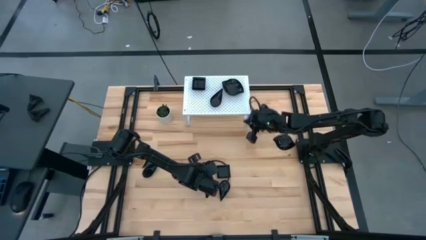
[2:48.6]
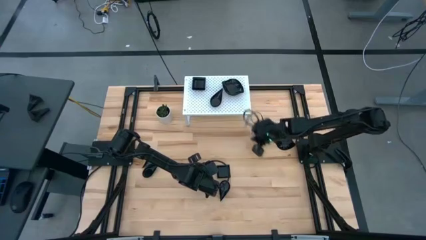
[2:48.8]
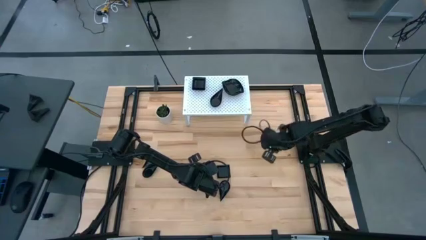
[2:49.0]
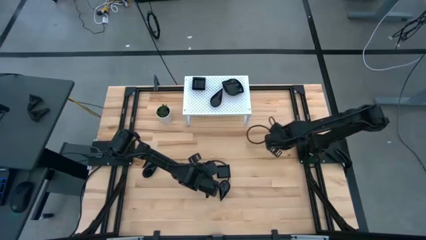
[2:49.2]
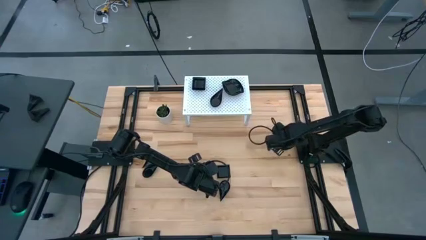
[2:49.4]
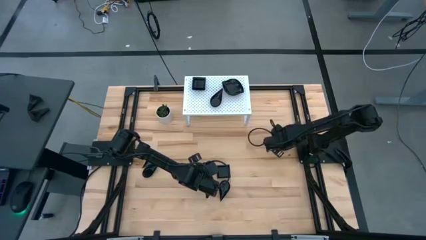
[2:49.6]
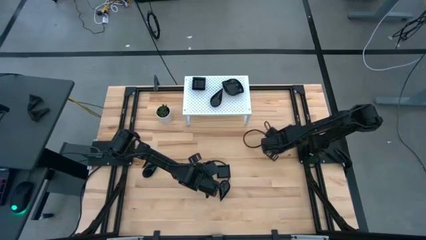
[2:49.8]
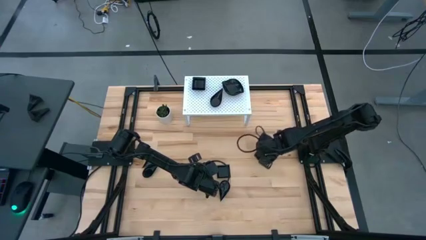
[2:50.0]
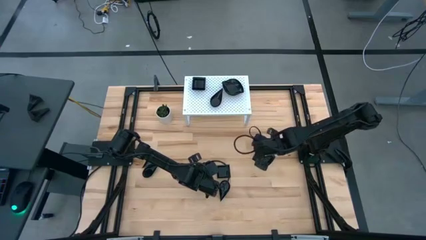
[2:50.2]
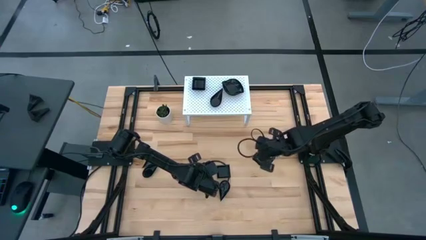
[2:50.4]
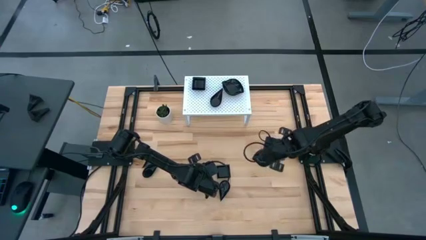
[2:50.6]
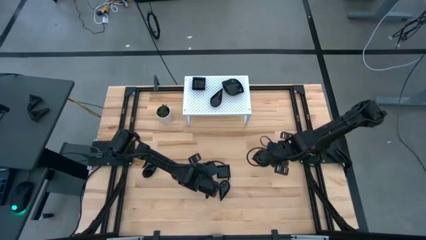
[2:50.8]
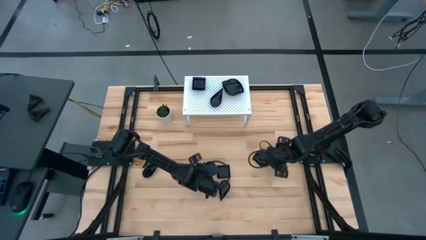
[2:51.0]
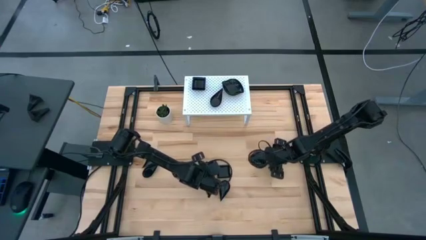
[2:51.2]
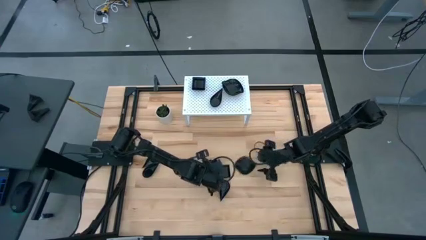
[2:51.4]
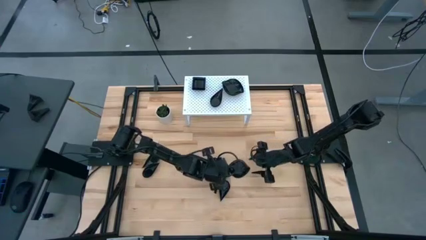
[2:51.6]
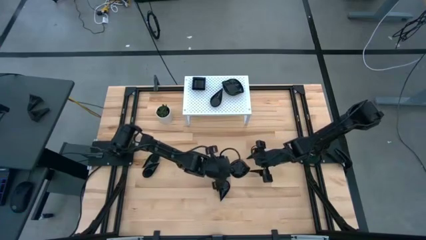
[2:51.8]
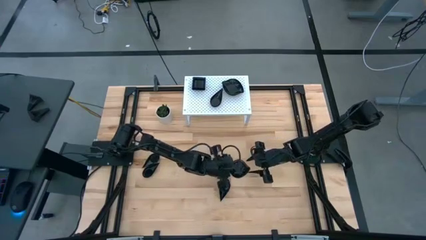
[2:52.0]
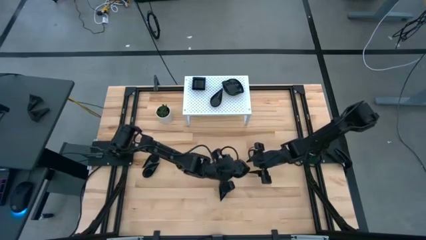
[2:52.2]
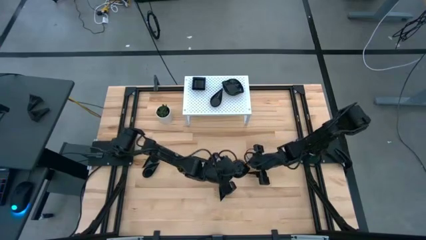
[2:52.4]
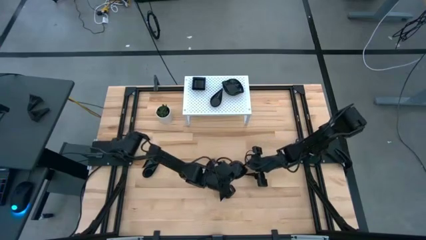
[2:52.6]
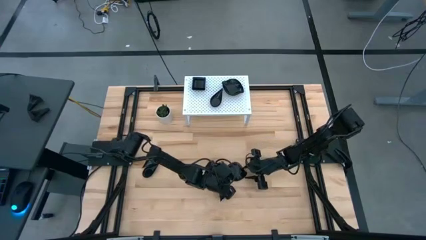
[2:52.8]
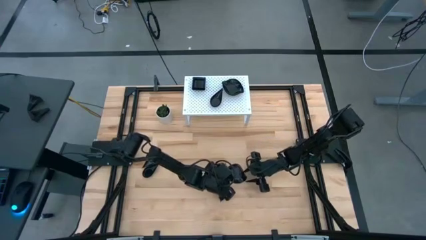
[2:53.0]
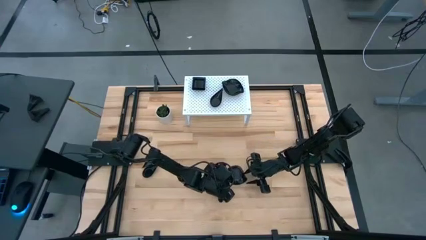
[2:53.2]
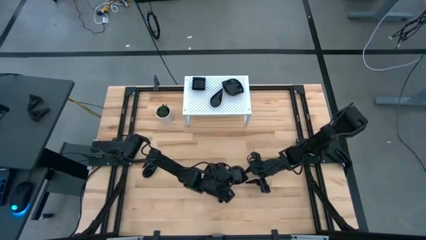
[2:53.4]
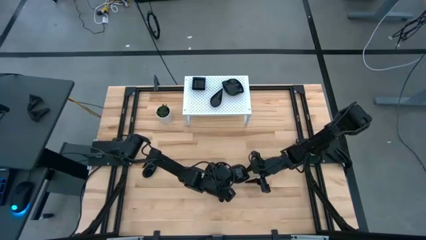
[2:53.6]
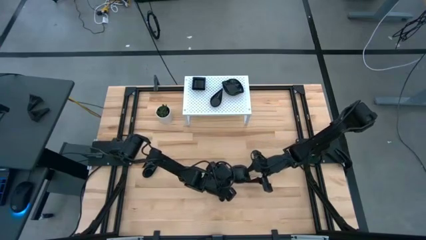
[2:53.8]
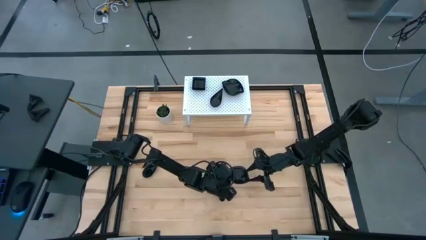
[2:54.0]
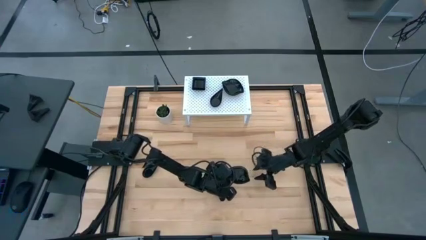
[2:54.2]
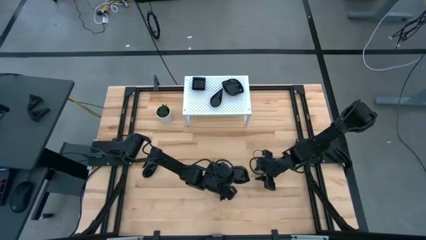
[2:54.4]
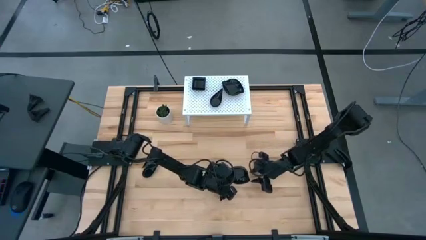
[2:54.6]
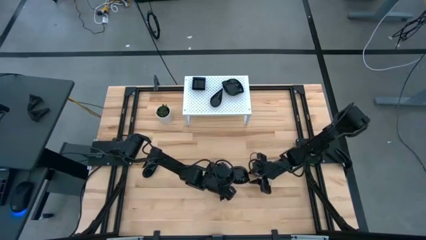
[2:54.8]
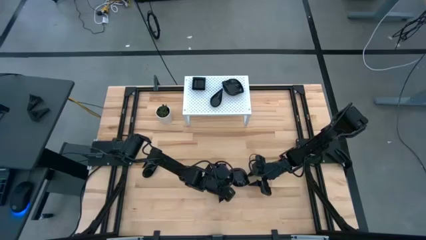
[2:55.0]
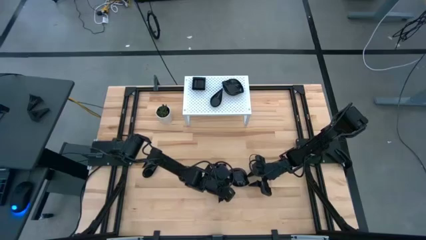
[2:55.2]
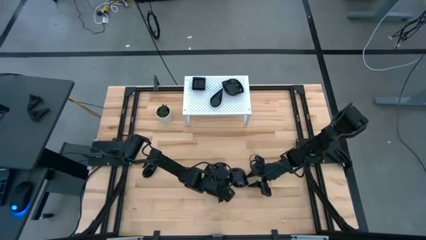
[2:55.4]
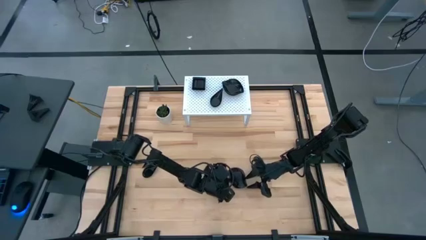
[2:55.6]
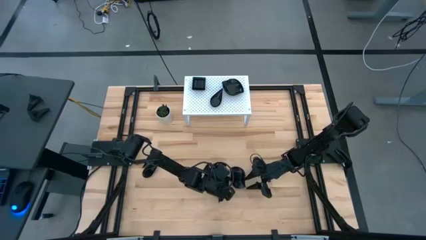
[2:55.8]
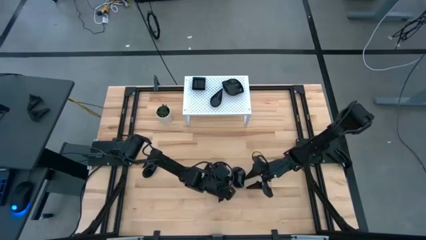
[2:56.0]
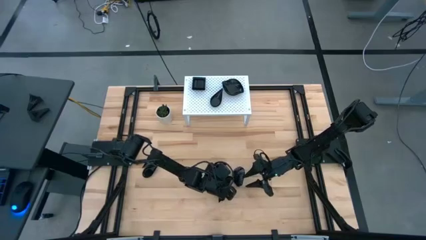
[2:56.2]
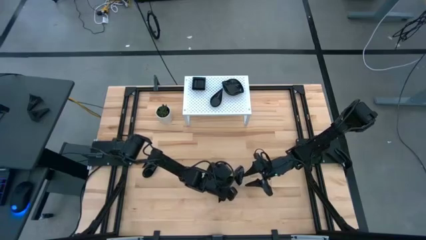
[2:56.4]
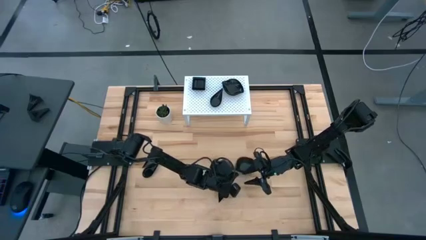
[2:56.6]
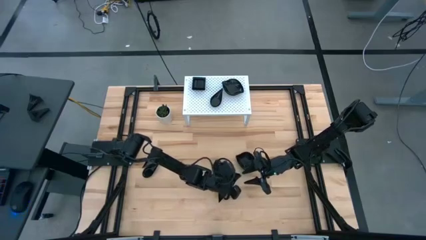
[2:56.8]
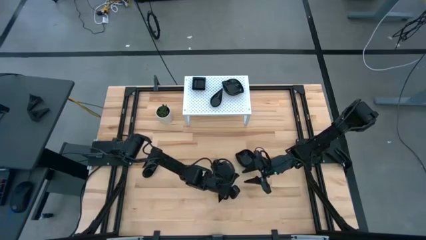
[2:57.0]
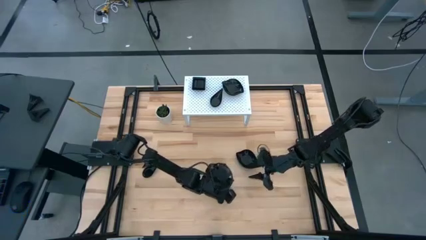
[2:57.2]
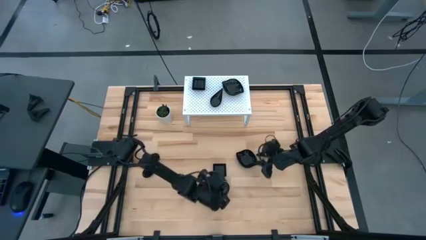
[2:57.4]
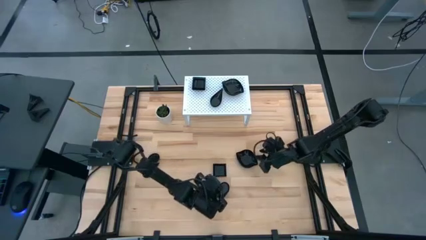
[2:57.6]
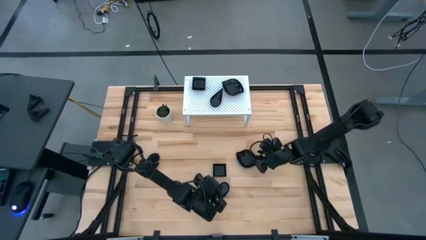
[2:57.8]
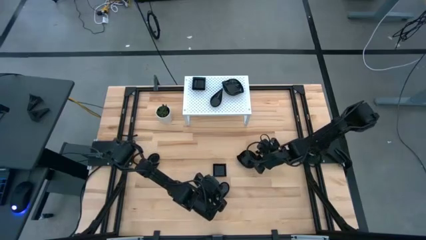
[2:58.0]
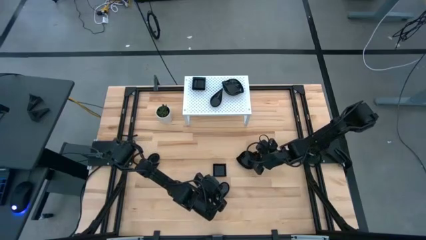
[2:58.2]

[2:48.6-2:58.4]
Task: Pick & Place Mini shaped plates
Stack the black plate on top of the black plate on the shelf

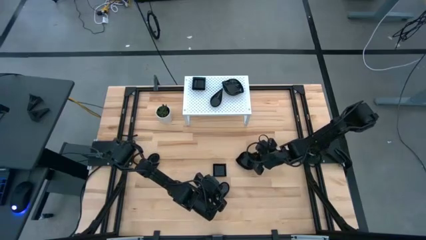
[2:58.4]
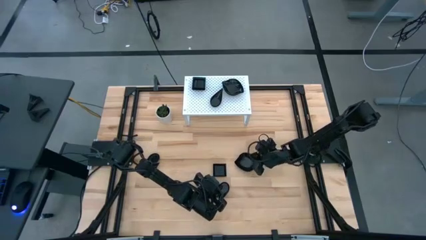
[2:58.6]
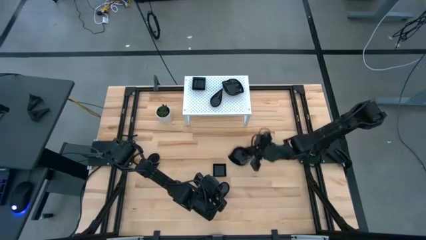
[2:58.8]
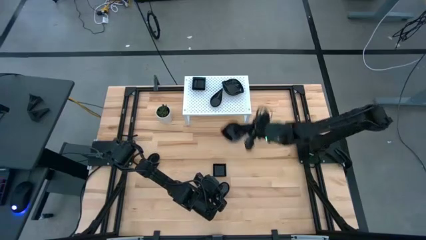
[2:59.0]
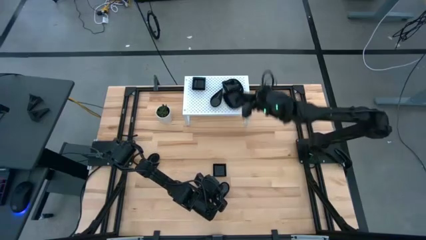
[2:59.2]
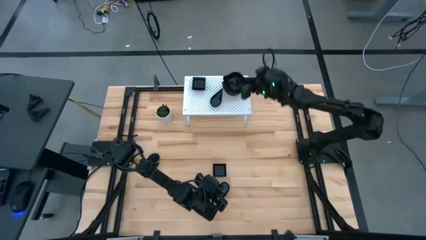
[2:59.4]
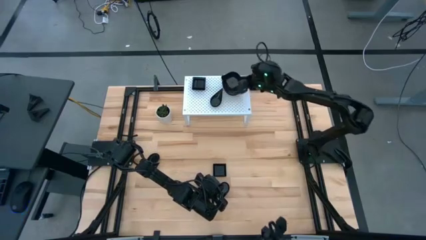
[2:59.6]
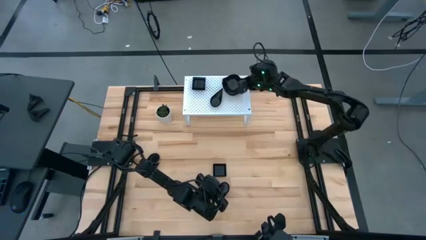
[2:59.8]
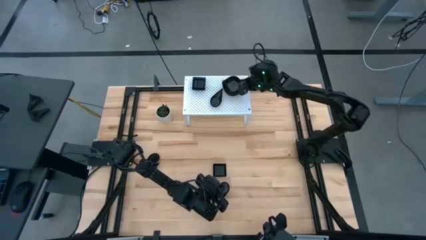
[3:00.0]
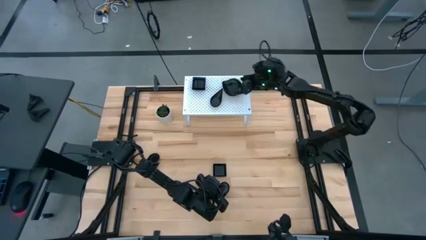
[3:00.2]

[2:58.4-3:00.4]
Stack the black plate on top of the black plate on the shelf

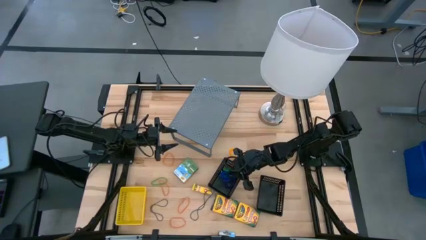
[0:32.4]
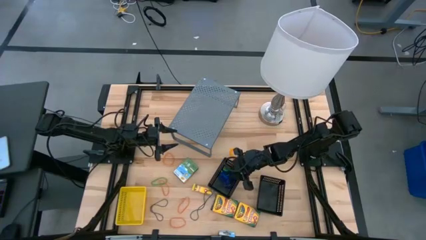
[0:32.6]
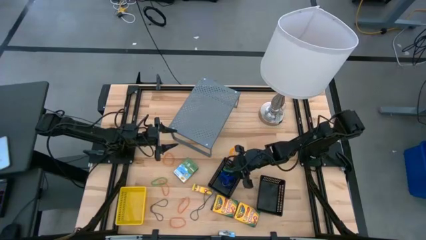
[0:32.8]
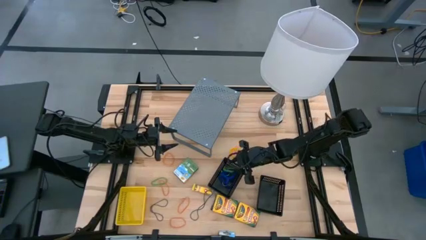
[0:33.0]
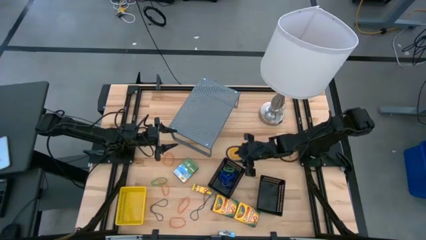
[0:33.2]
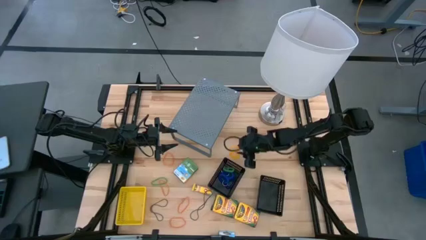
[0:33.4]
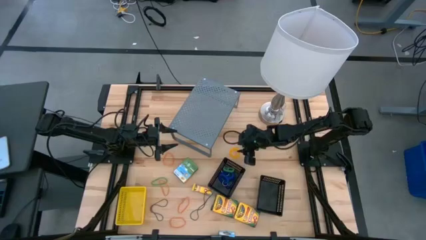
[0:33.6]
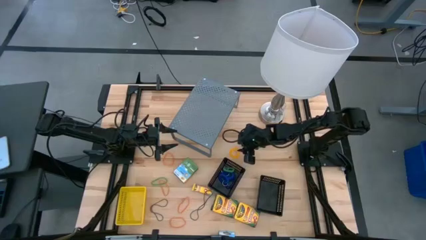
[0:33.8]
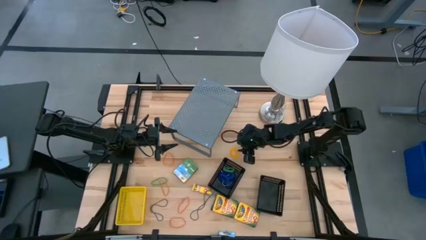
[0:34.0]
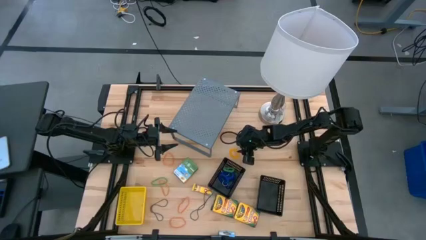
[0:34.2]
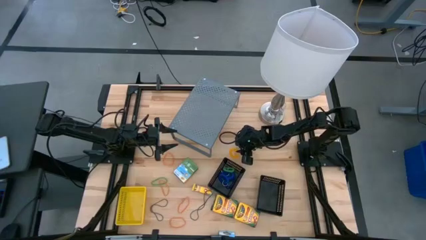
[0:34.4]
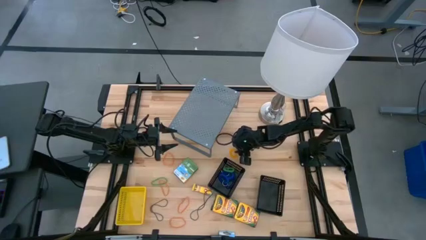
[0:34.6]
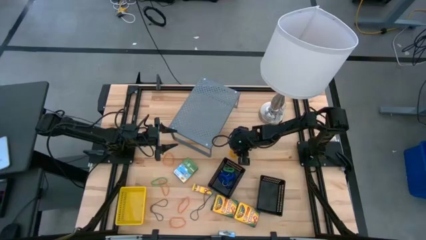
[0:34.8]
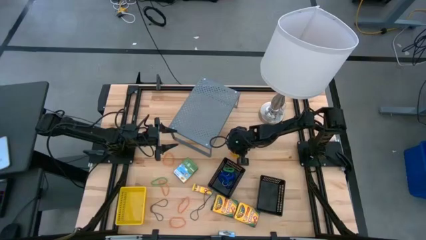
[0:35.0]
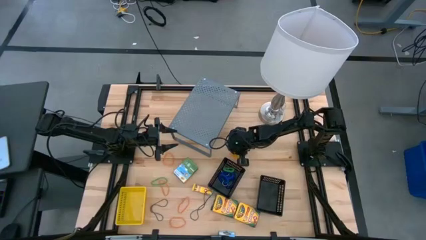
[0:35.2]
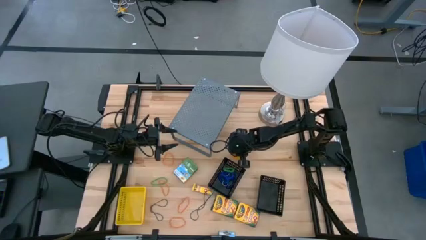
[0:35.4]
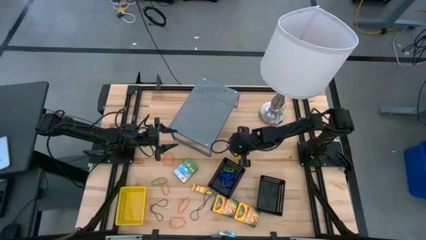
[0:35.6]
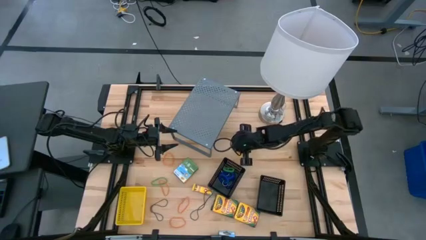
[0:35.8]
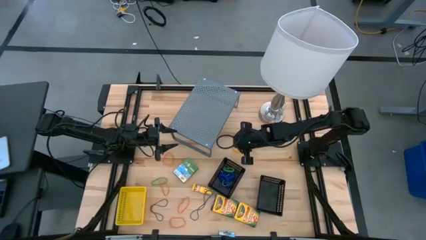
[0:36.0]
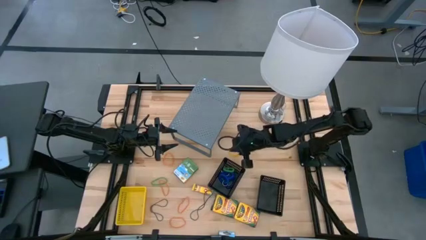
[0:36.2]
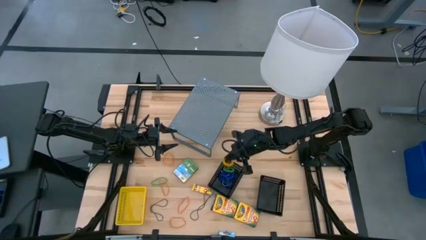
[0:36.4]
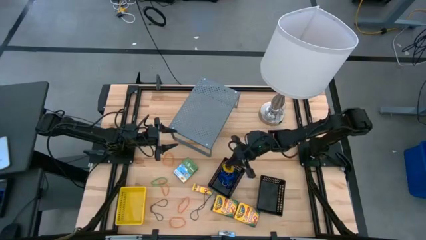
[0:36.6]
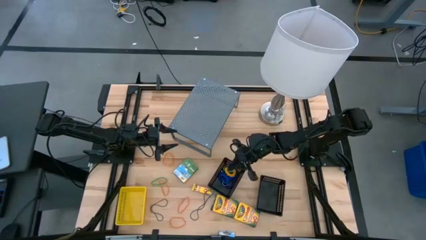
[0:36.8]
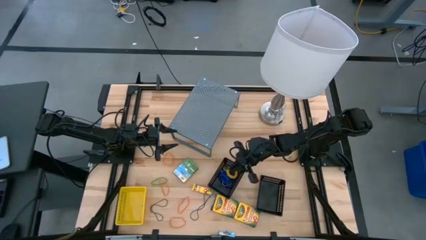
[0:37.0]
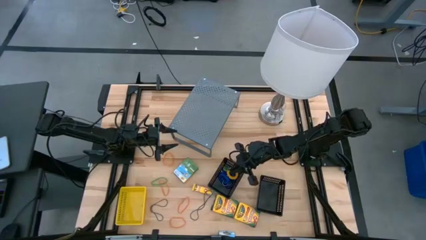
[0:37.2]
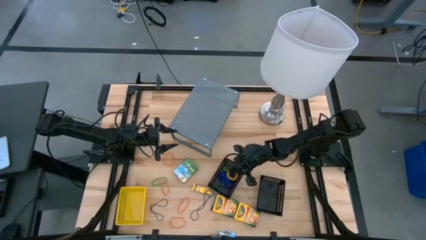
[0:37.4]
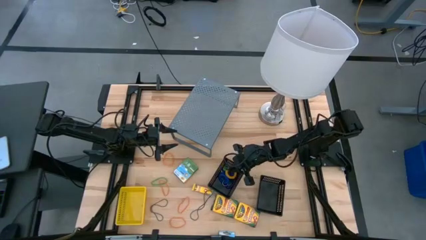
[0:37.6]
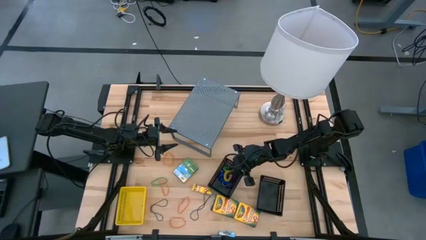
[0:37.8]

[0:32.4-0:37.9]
Task: Pick & Place Office Desk Supplies
Put the orange spring keychain into the left black bin
